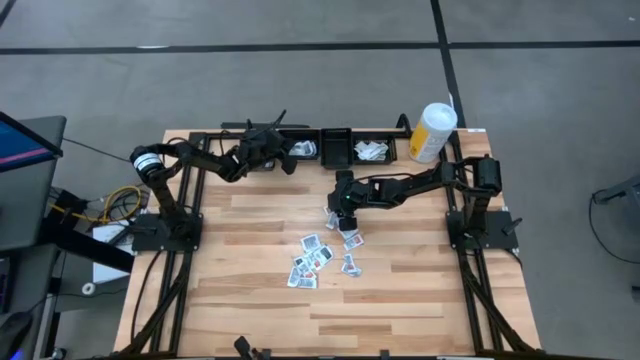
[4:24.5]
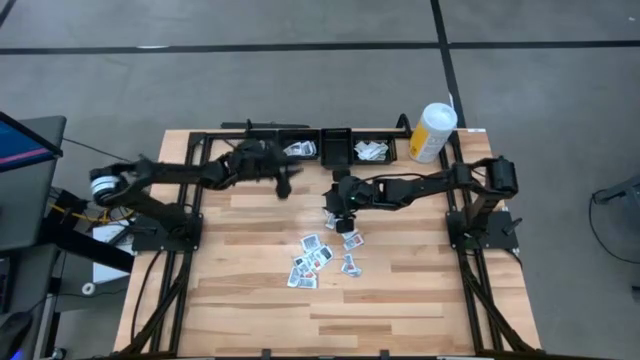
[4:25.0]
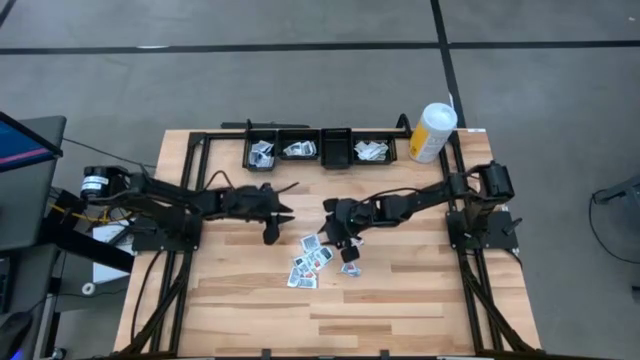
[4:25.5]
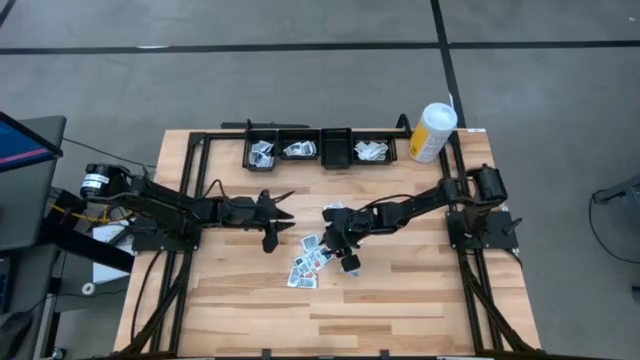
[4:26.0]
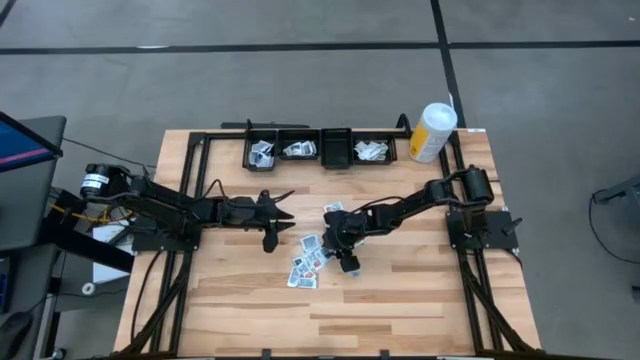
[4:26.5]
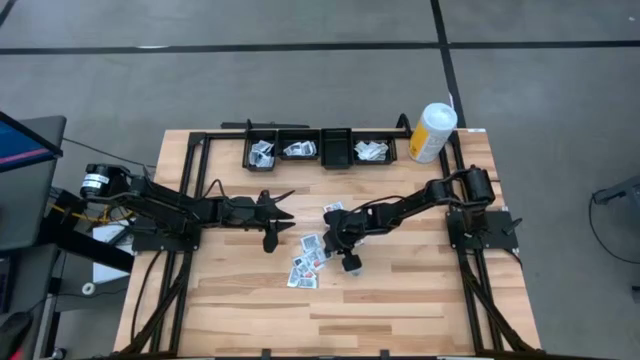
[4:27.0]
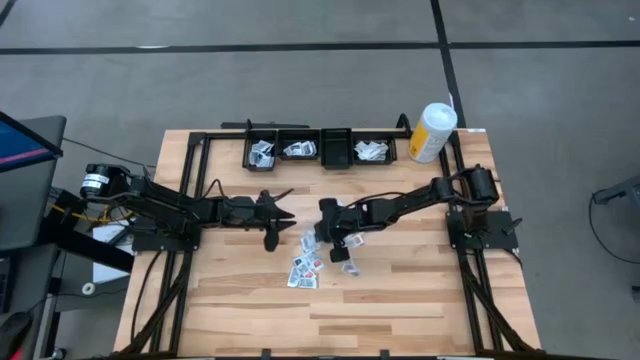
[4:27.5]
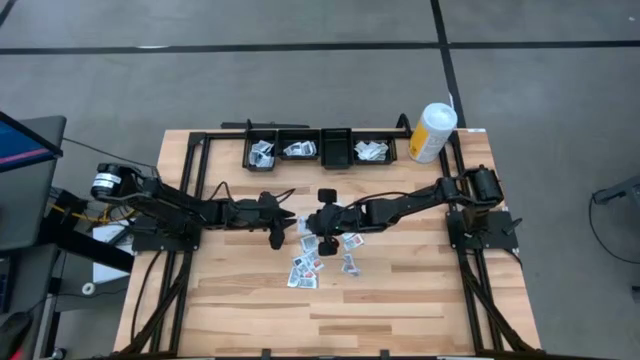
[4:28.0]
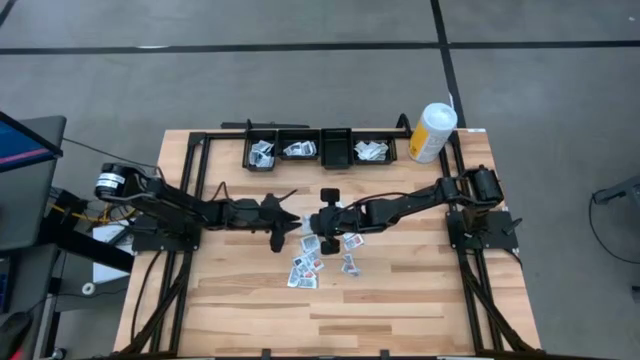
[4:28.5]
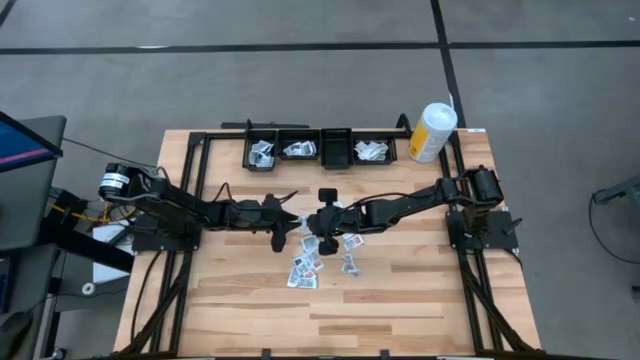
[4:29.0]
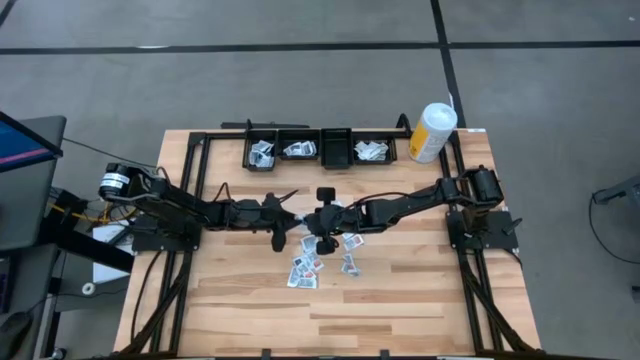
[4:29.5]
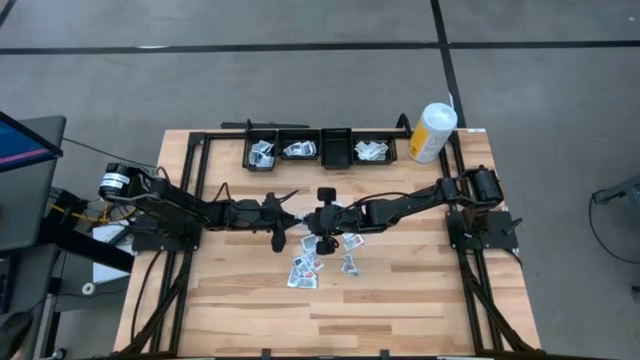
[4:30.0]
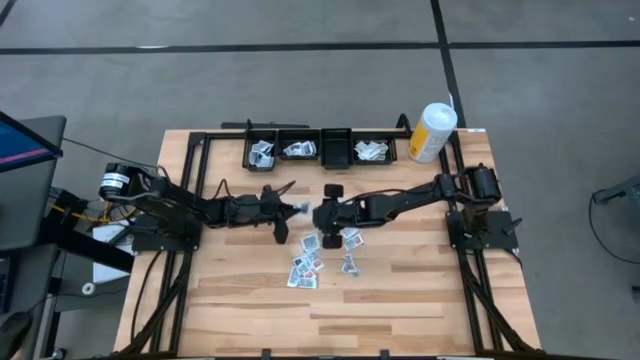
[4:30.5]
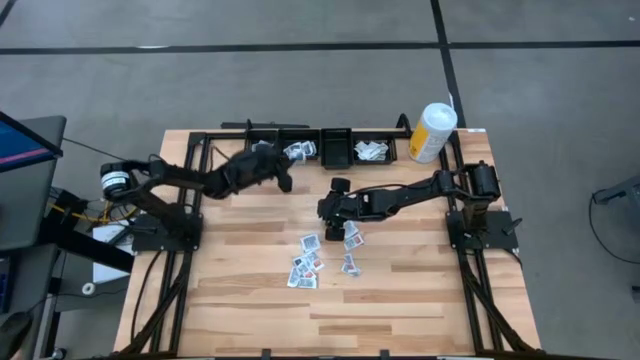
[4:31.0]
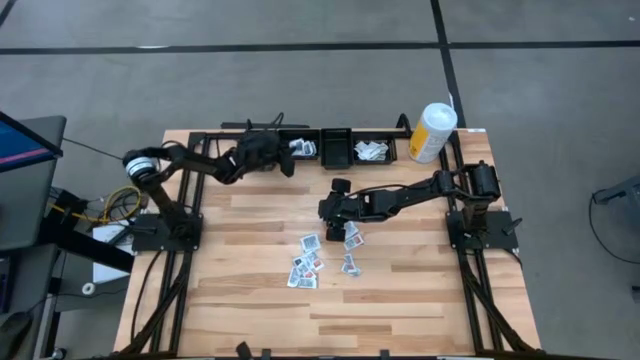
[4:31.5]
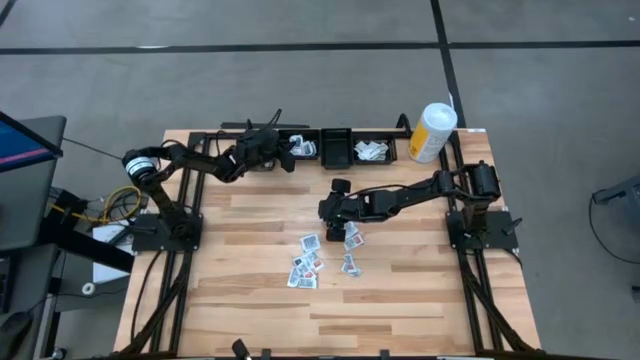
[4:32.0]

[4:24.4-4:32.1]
Task: Pick & Place First Aid Supplies
Put the black towelette pack into the middle left black bin

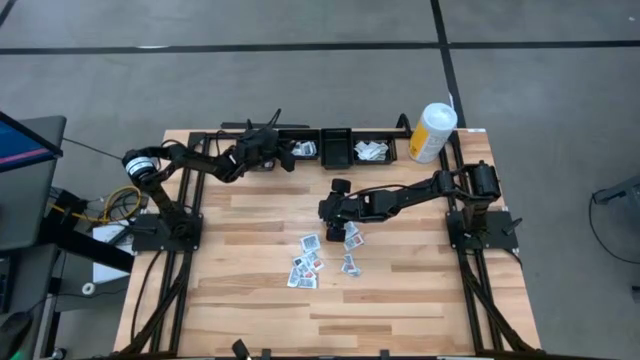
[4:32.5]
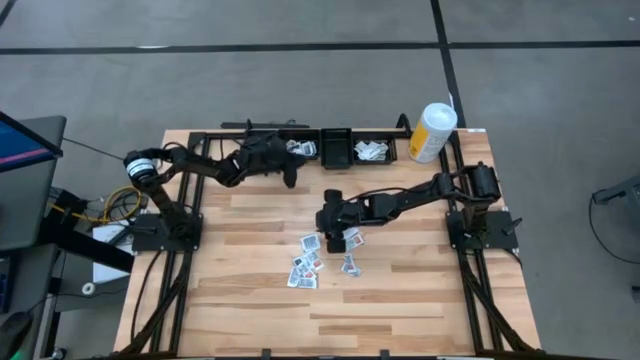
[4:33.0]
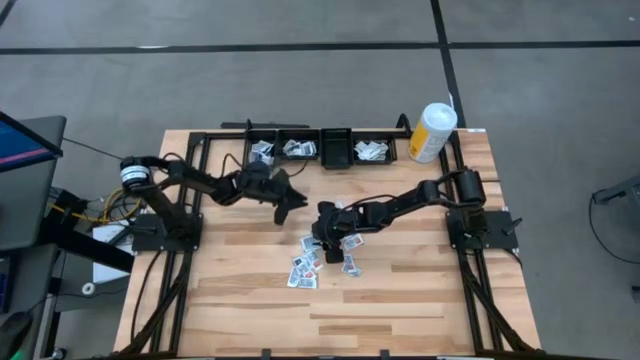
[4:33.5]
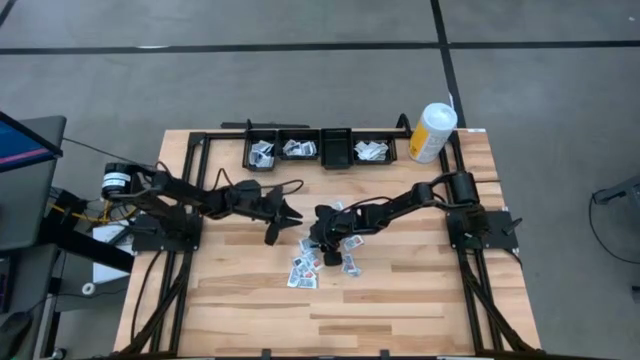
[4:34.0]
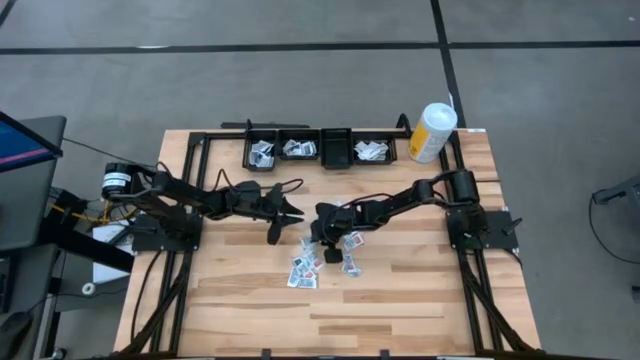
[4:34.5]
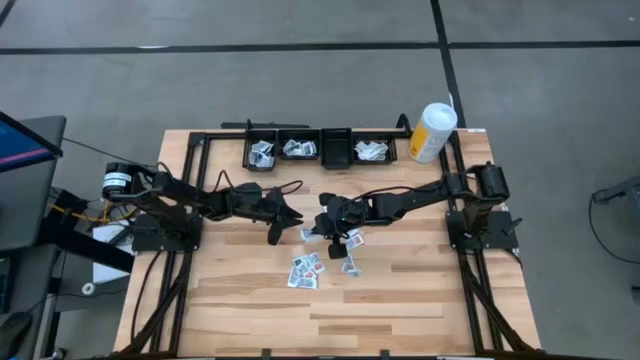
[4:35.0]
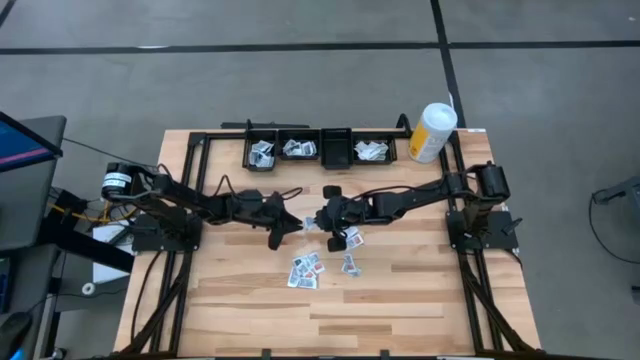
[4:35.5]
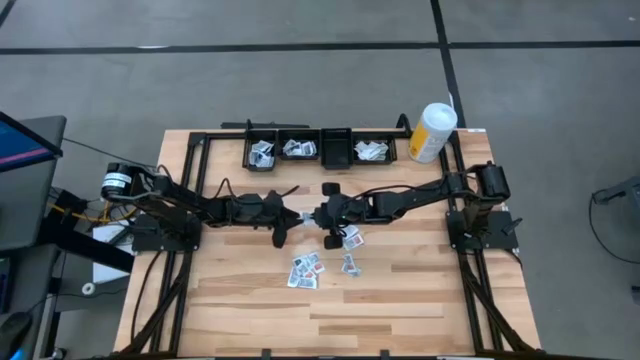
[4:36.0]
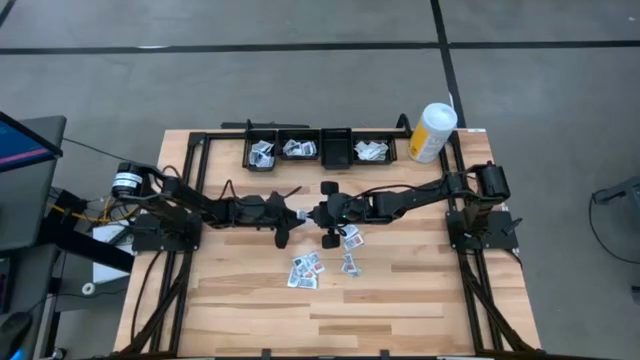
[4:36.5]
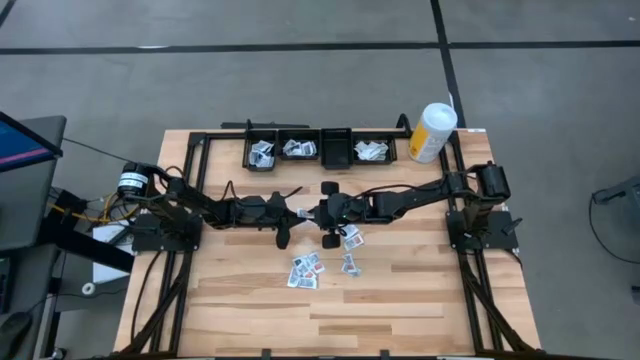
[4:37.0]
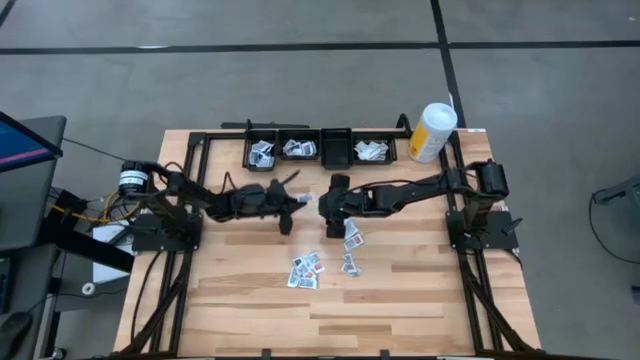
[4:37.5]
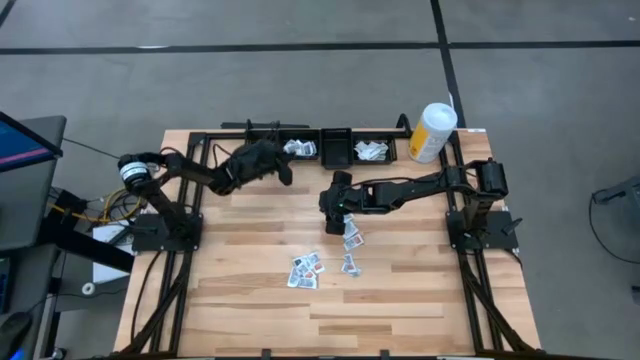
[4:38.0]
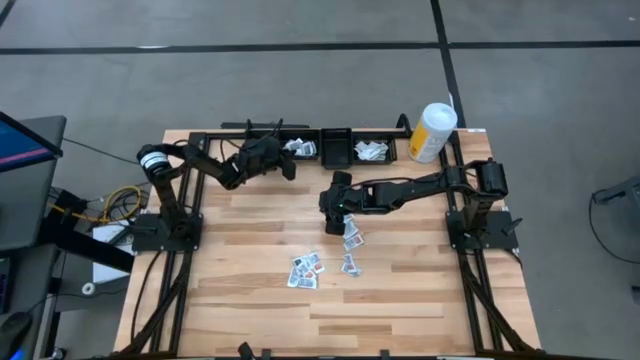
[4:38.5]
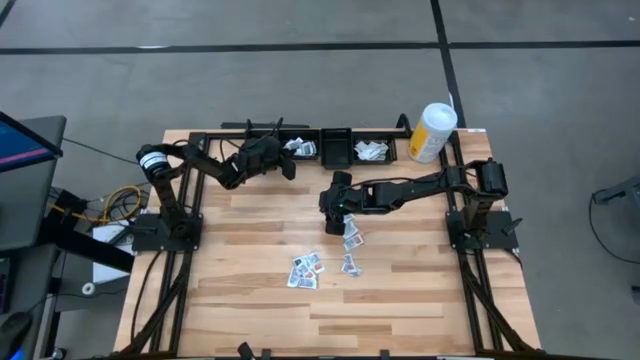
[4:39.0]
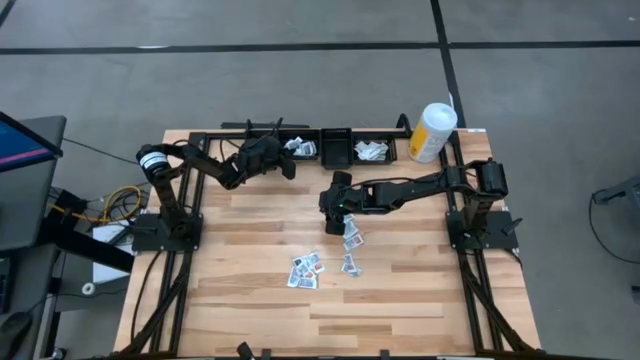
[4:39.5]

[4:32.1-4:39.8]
Put the black towelette pack into the middle left black bin

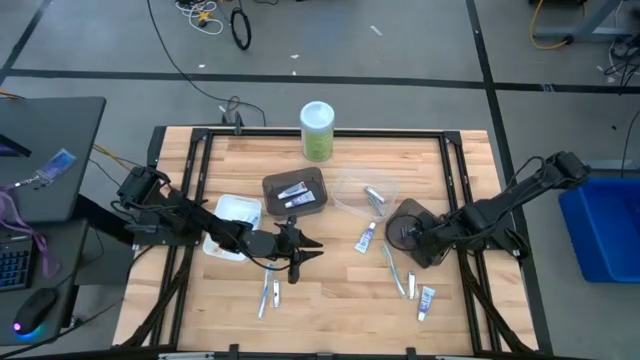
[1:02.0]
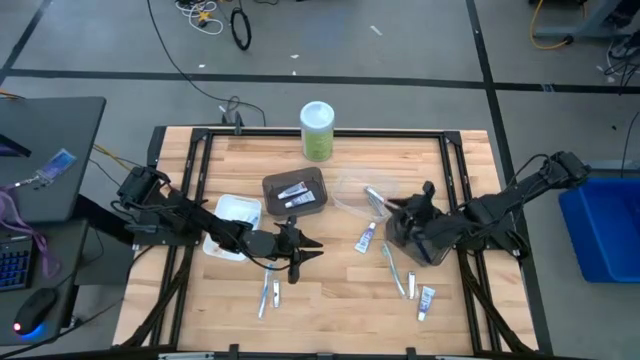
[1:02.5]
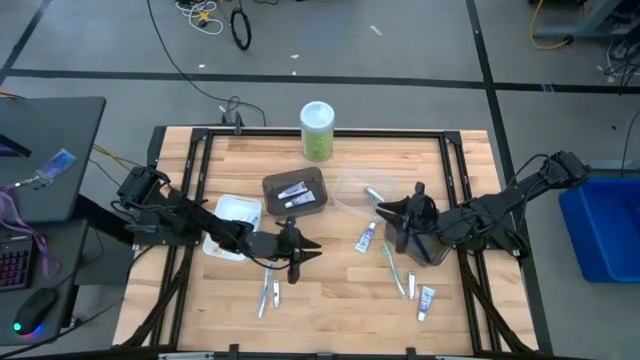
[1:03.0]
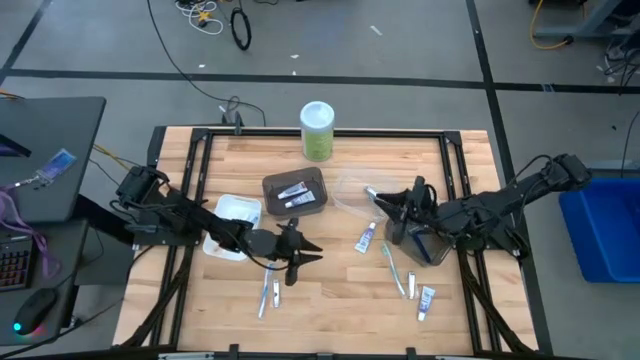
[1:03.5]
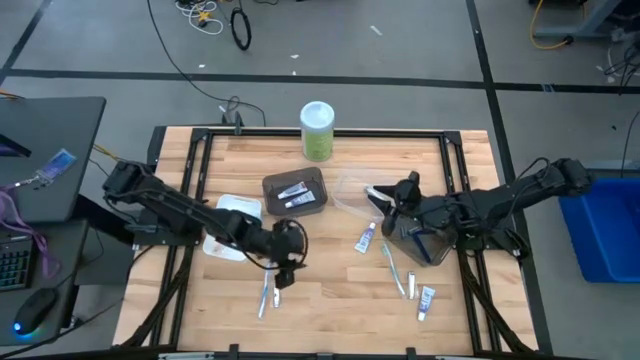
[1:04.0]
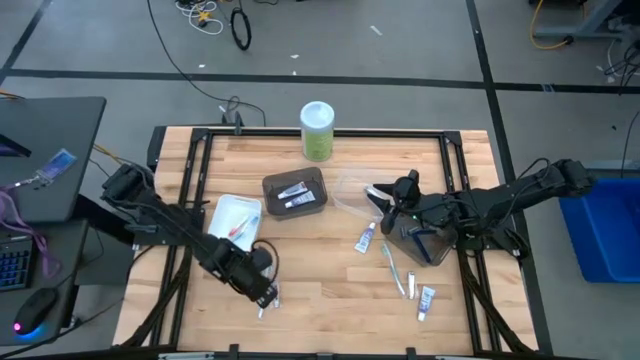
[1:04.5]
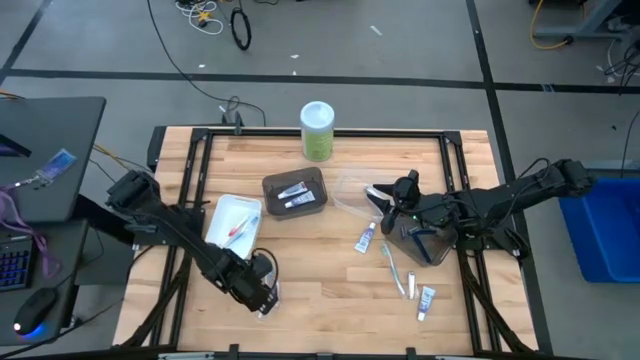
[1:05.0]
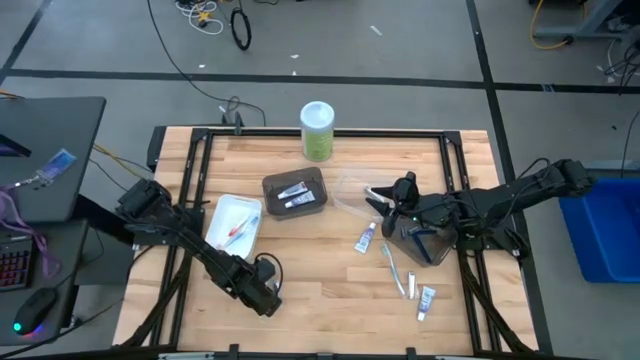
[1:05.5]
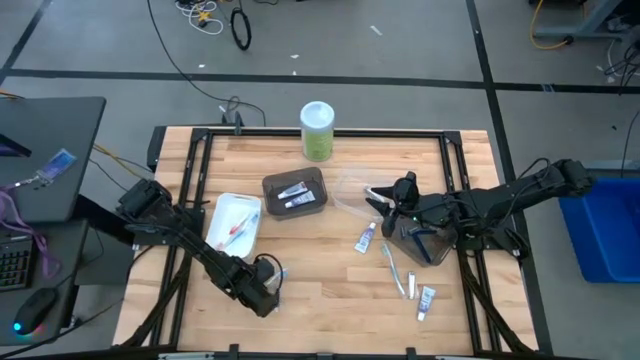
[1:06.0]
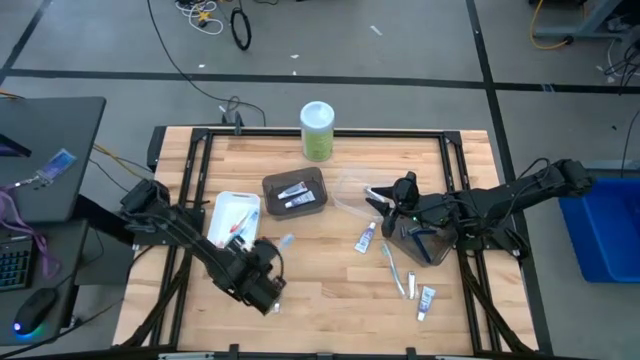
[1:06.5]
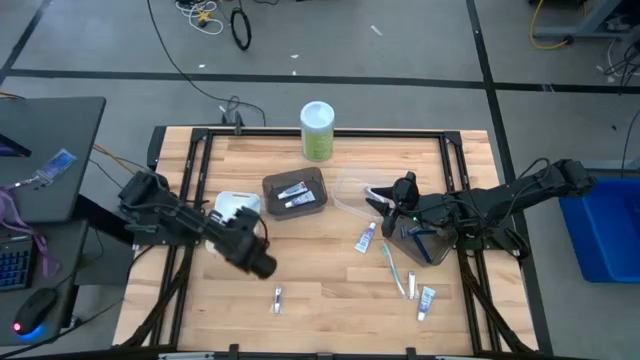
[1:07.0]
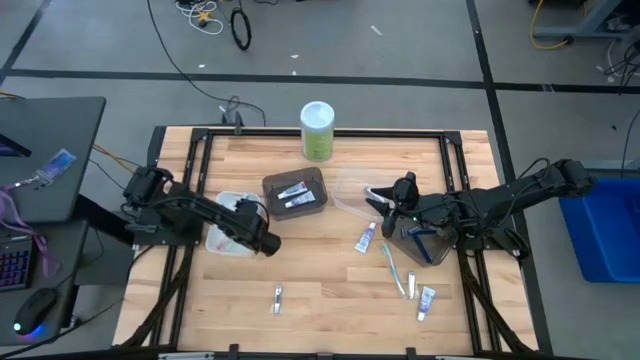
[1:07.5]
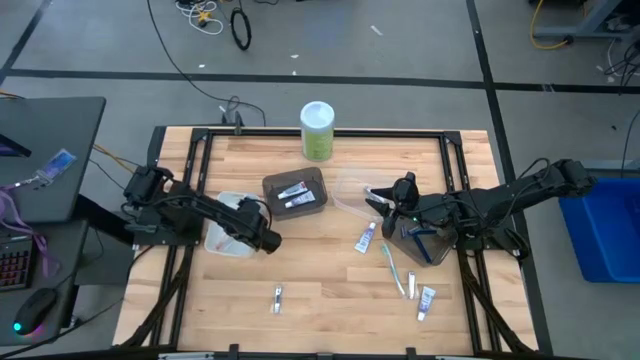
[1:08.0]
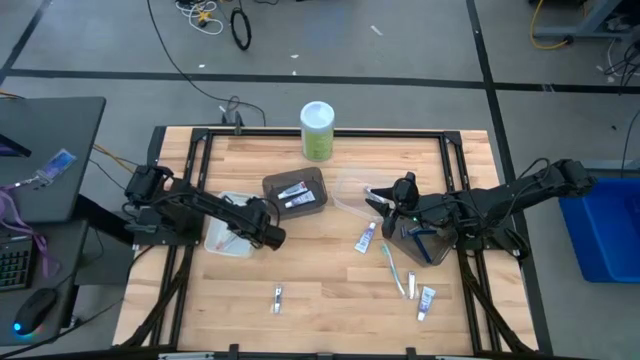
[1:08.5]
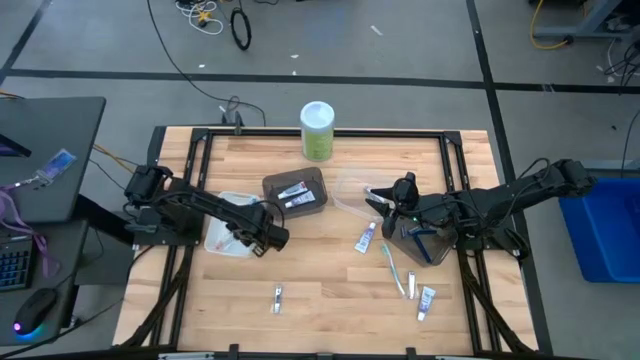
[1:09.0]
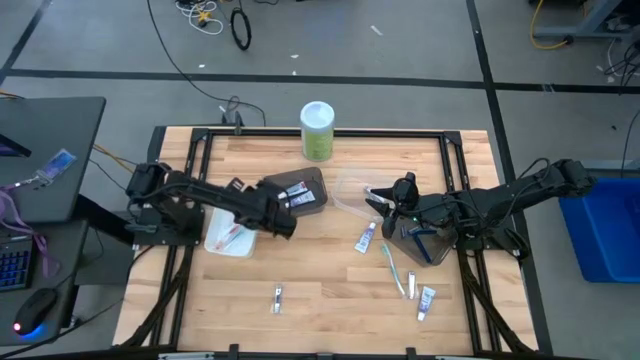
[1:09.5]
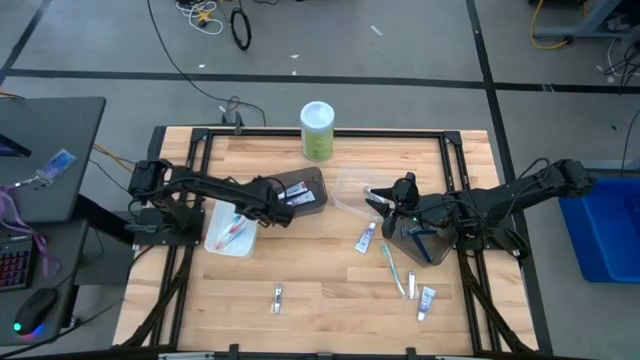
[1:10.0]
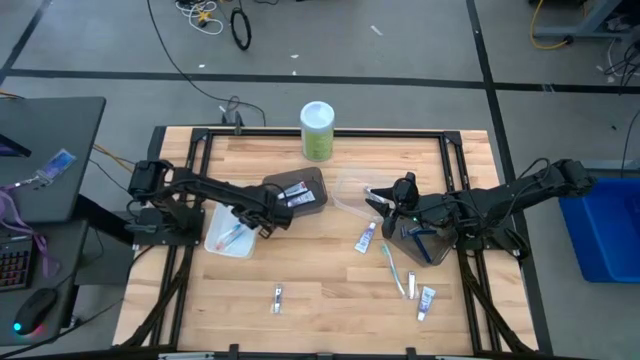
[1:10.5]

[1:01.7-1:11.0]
Task: Pick & Place Travel size toiletries
Put the blue toothbrush into the white bin
